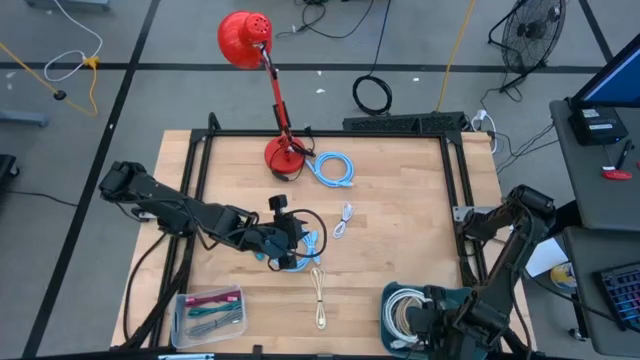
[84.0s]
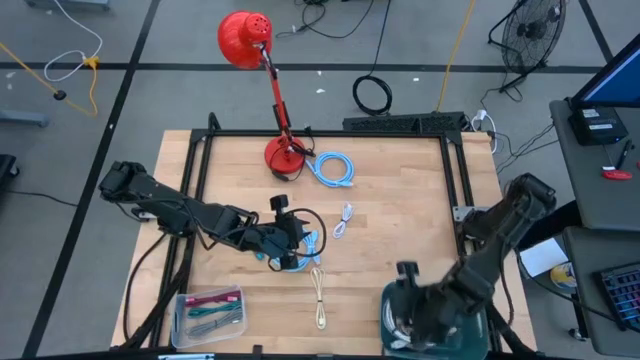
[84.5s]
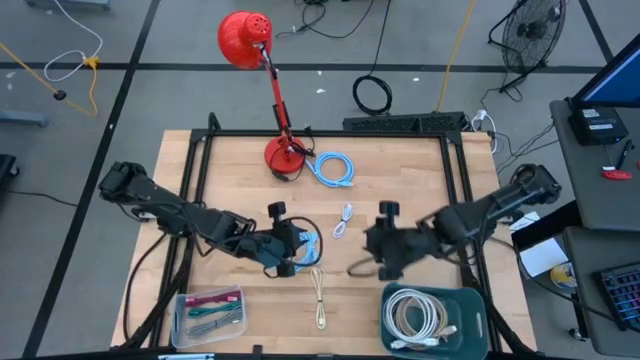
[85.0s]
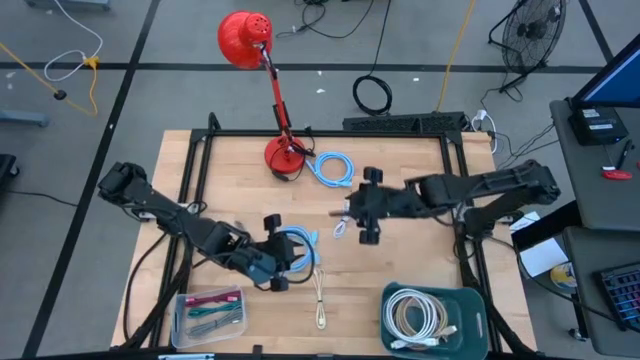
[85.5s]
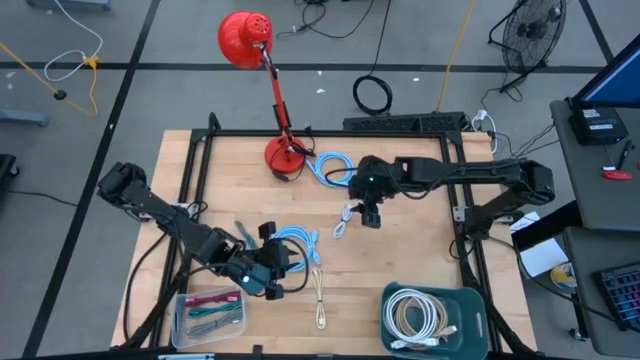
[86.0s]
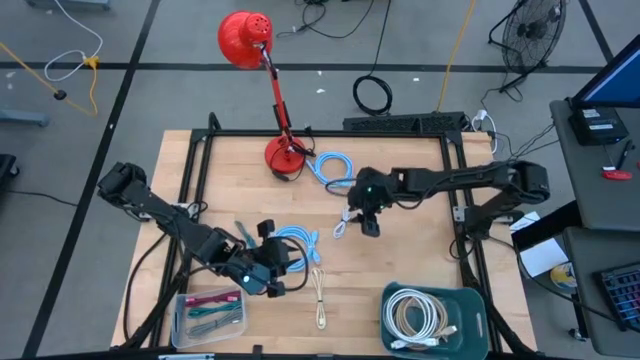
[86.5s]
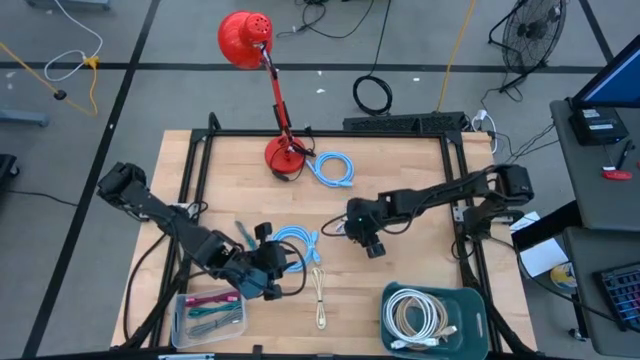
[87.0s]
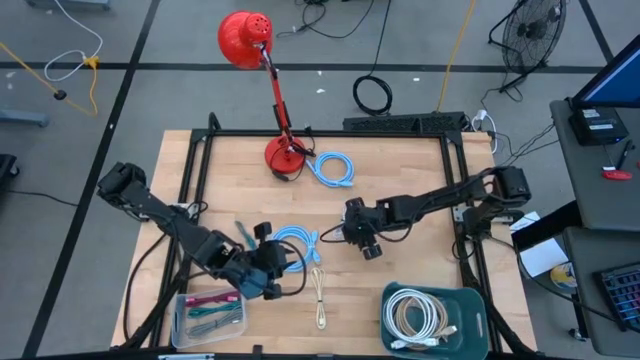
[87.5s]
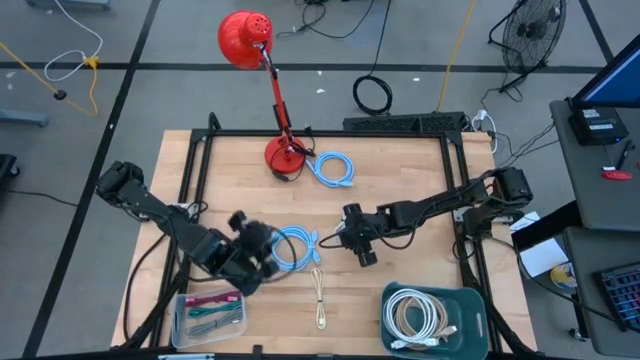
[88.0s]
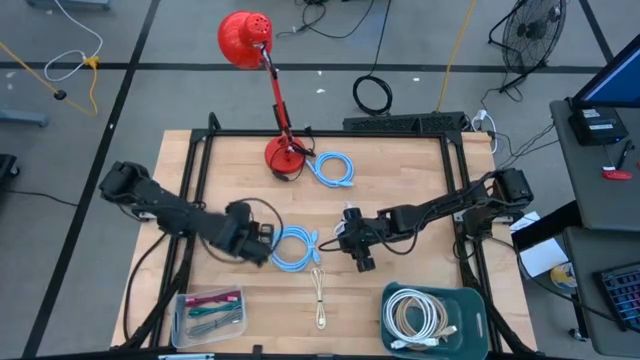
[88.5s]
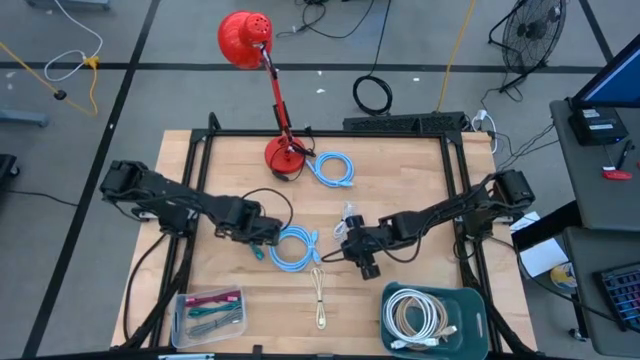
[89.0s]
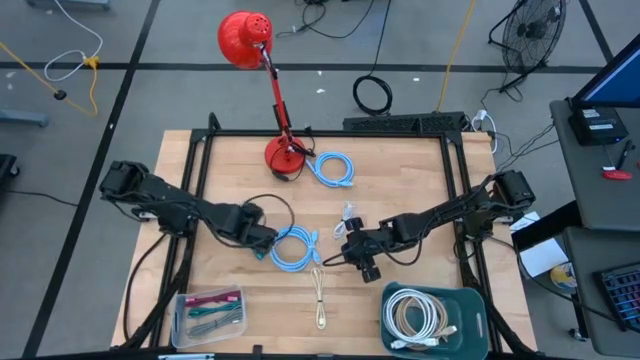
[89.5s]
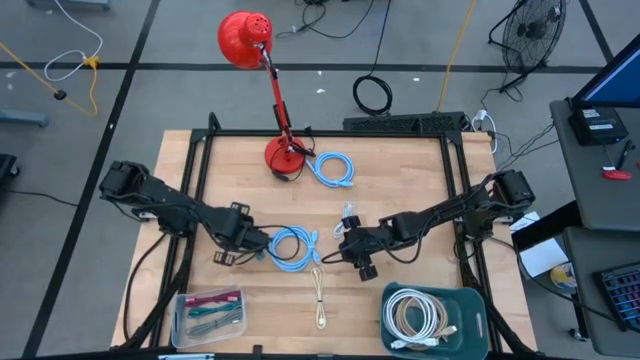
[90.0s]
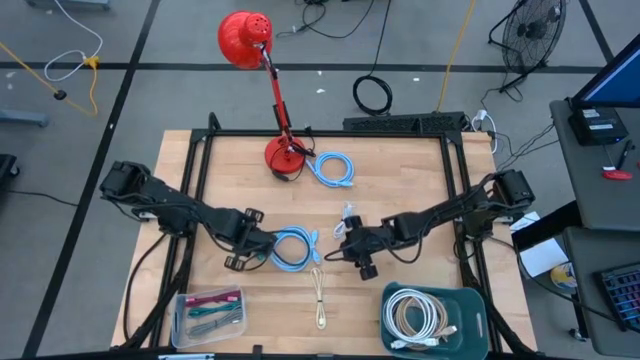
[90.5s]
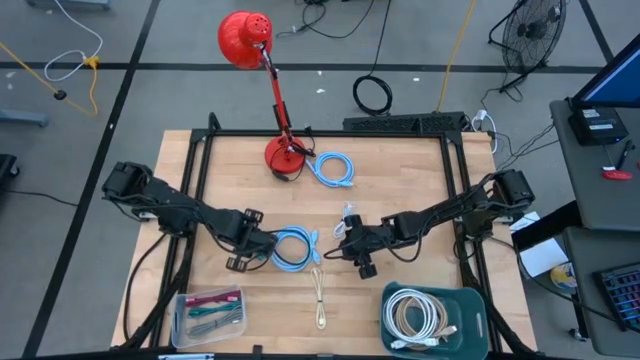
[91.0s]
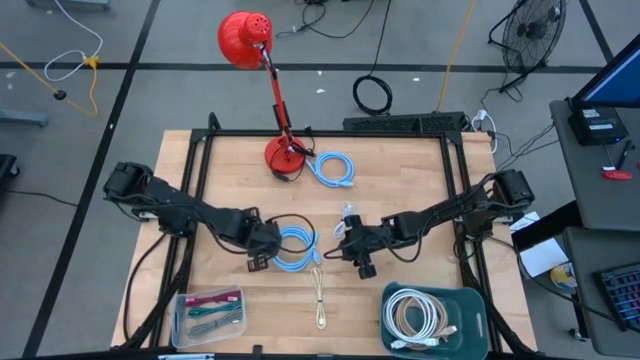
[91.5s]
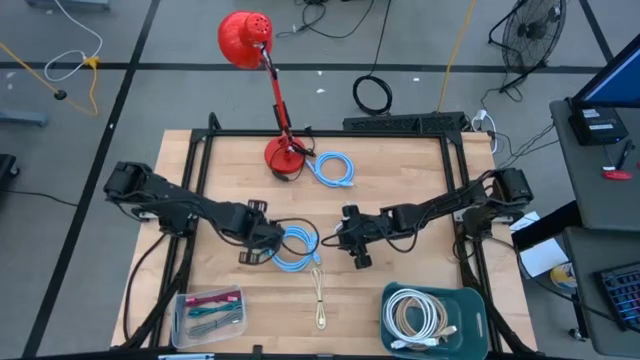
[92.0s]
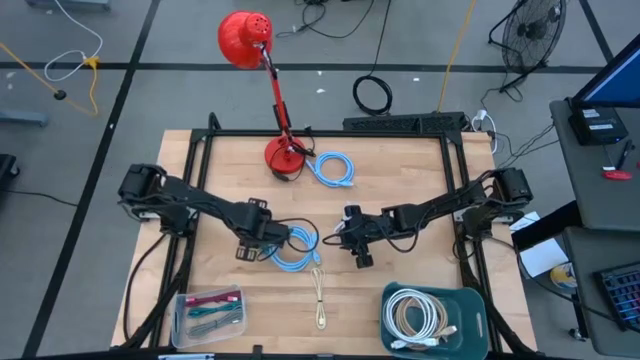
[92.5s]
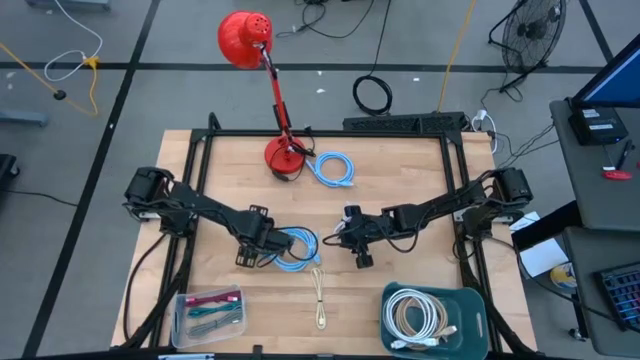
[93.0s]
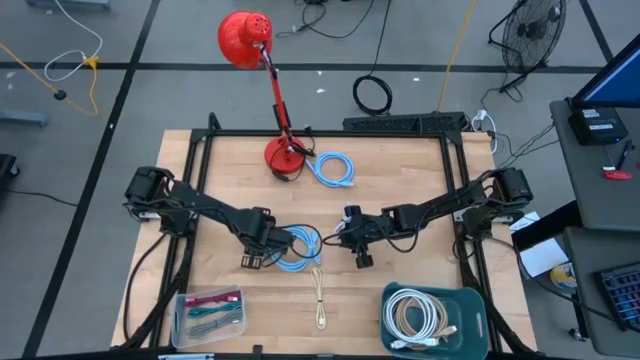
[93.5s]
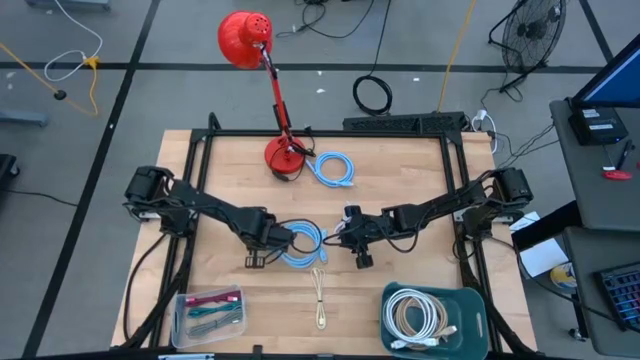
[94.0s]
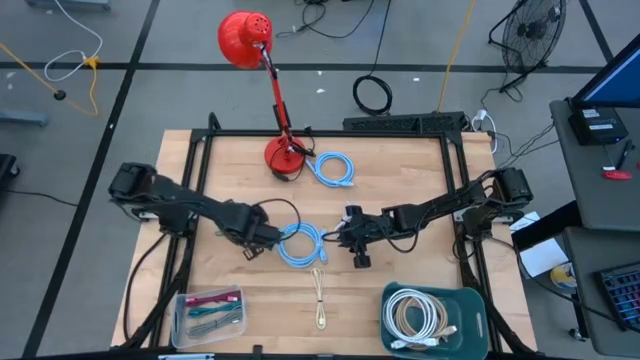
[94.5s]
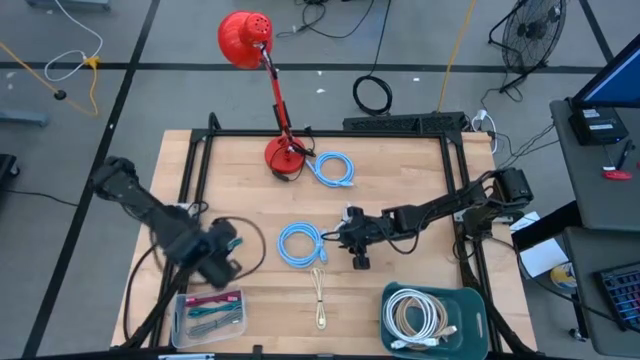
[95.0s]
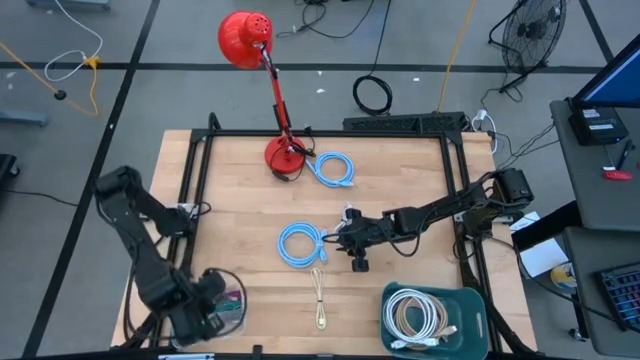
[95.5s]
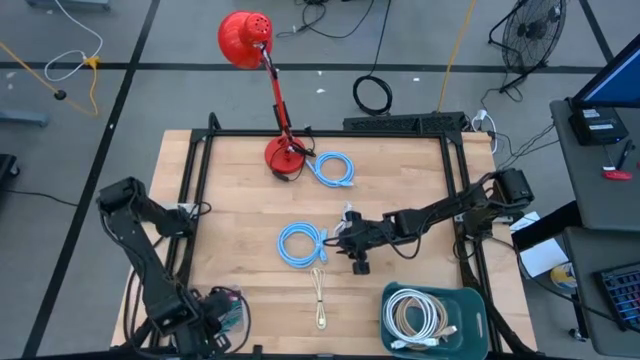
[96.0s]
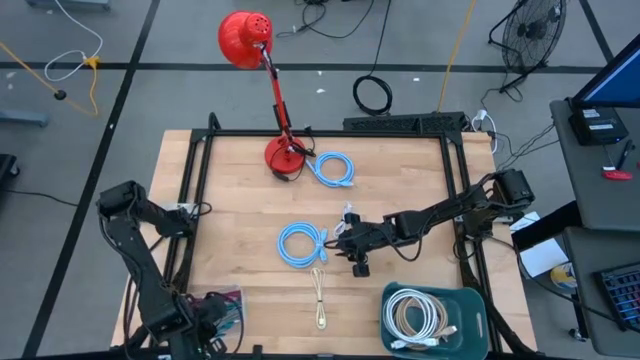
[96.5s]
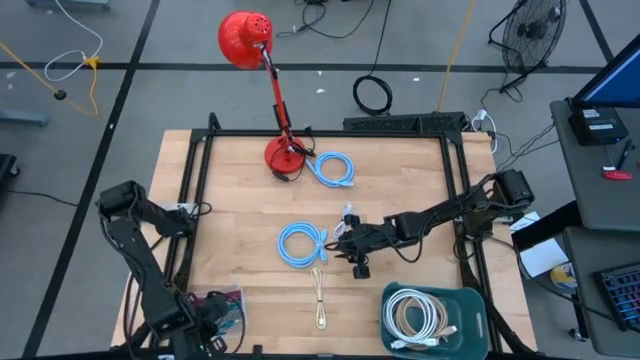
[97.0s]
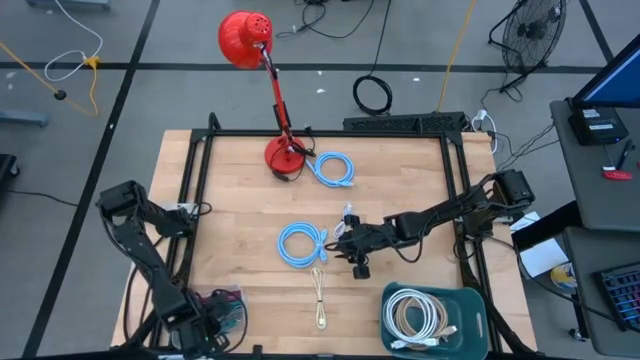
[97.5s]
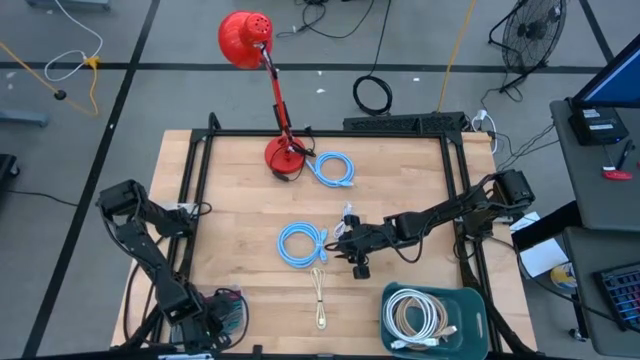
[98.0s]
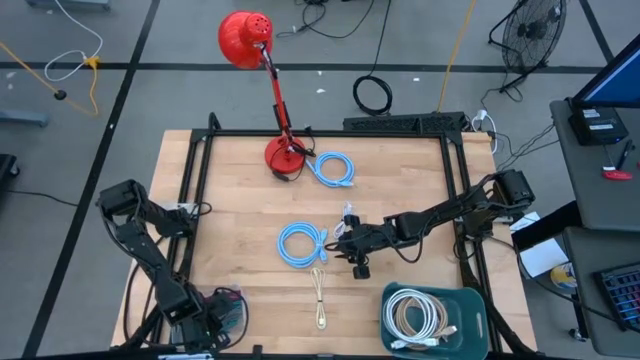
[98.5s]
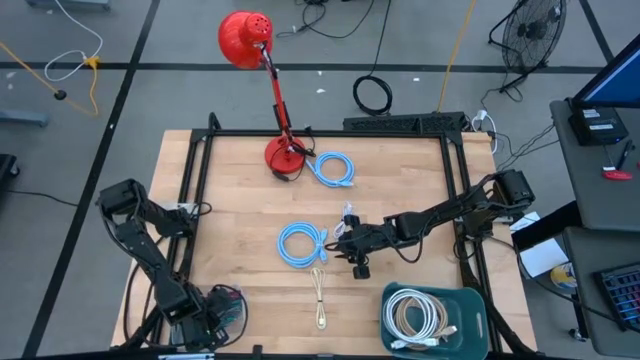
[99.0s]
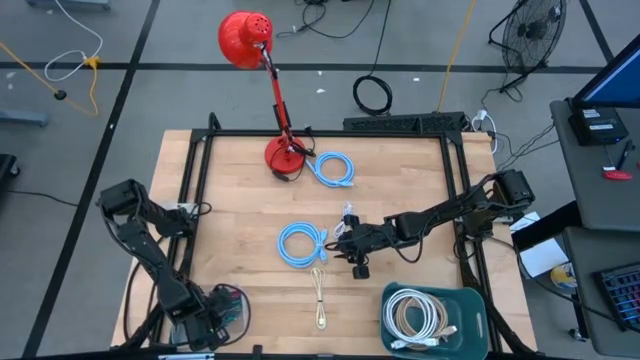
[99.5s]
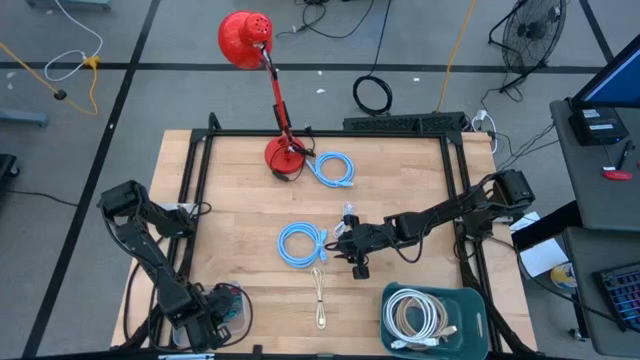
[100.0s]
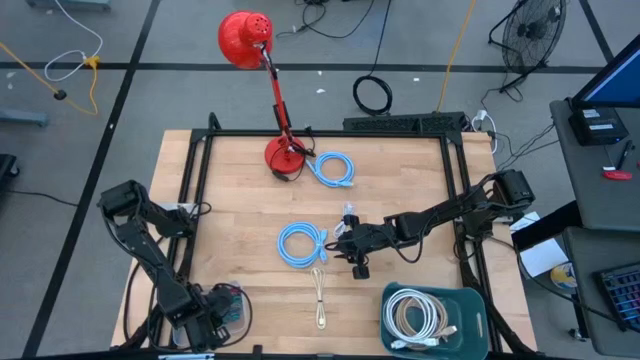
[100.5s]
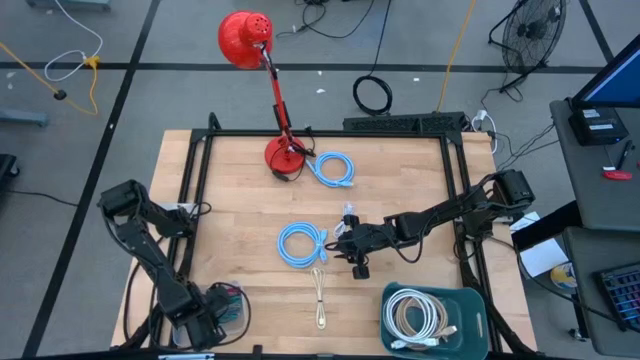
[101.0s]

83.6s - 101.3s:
Task: Pick & Place USB Port
Put the blue black charger cable into the transparent bin
